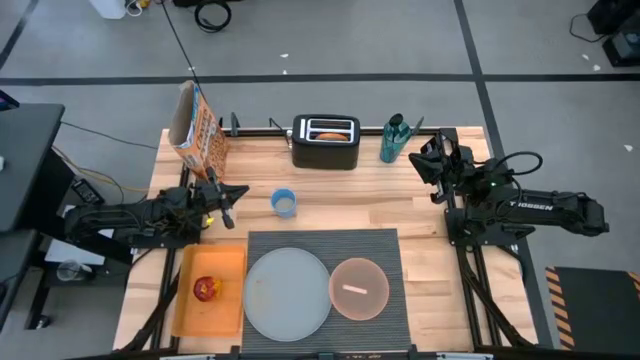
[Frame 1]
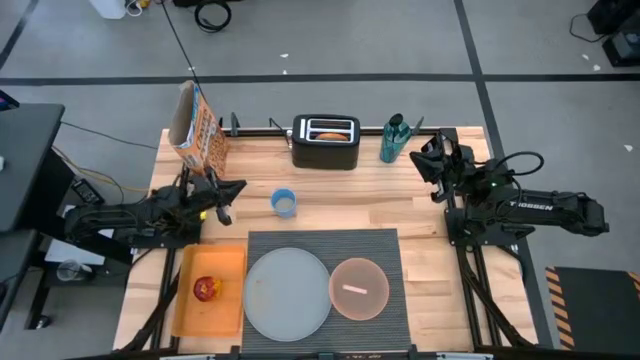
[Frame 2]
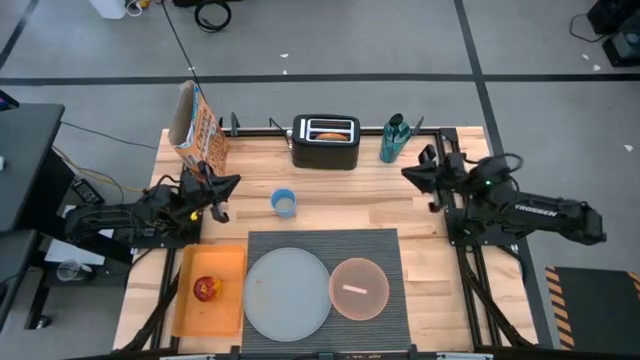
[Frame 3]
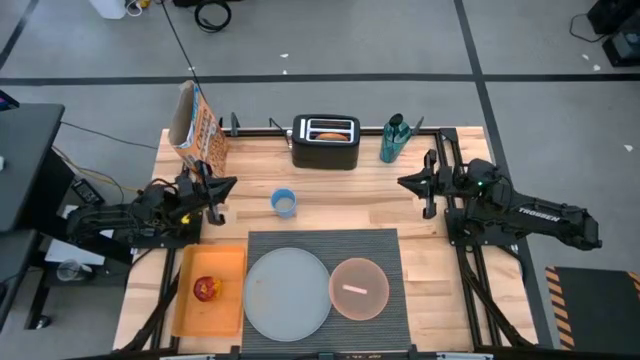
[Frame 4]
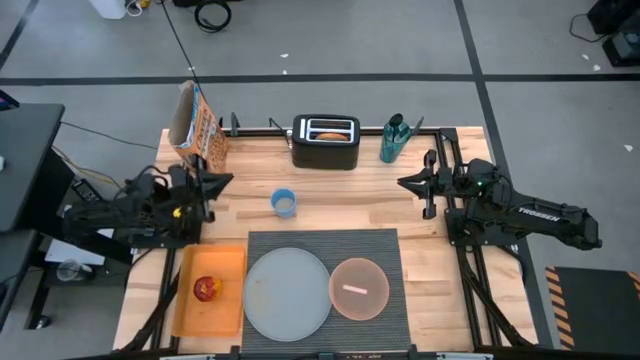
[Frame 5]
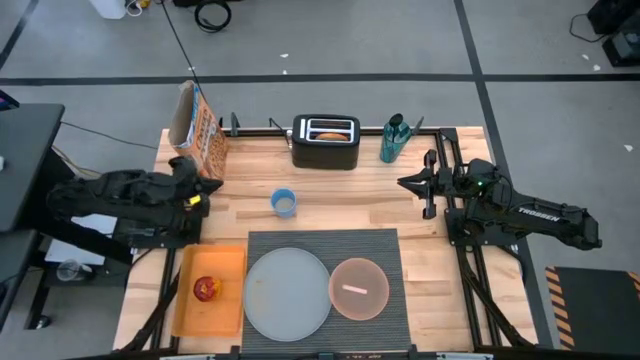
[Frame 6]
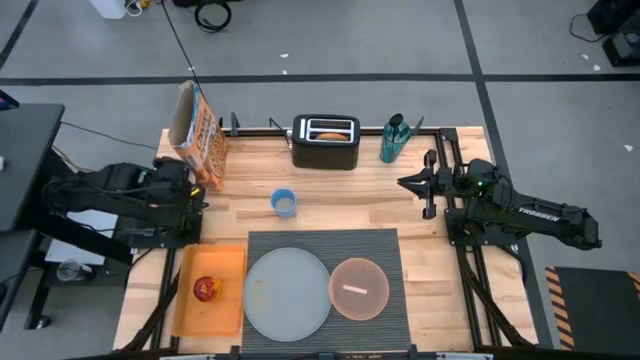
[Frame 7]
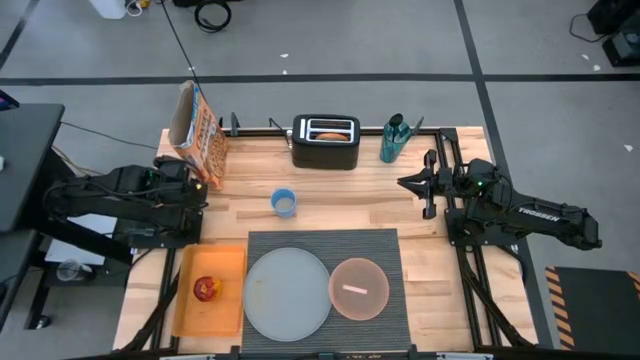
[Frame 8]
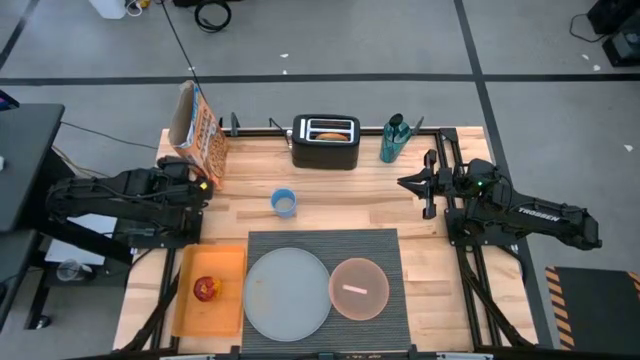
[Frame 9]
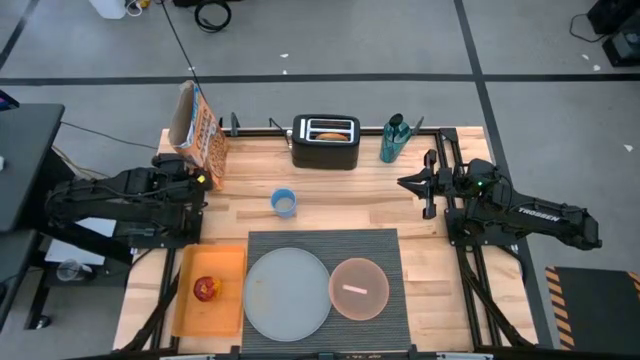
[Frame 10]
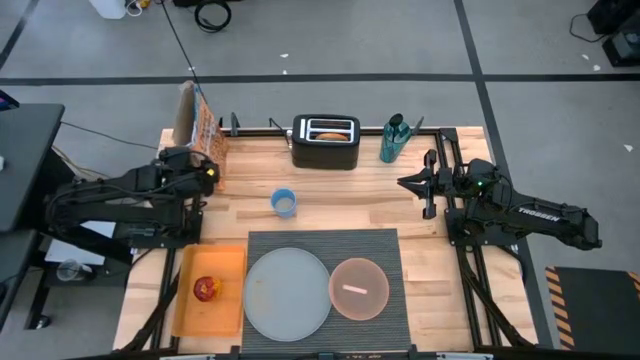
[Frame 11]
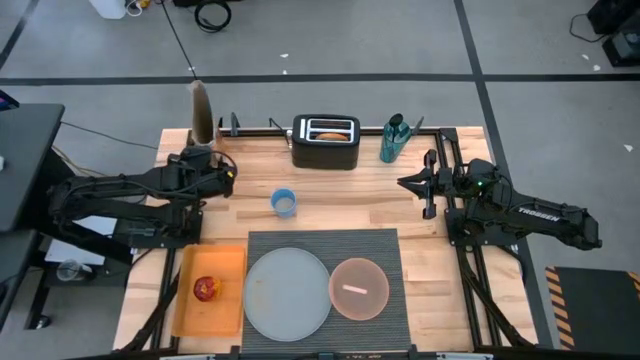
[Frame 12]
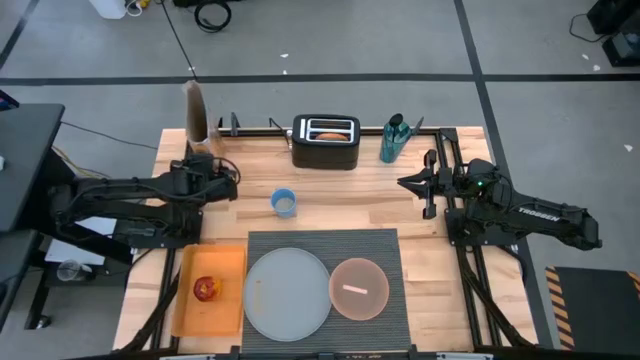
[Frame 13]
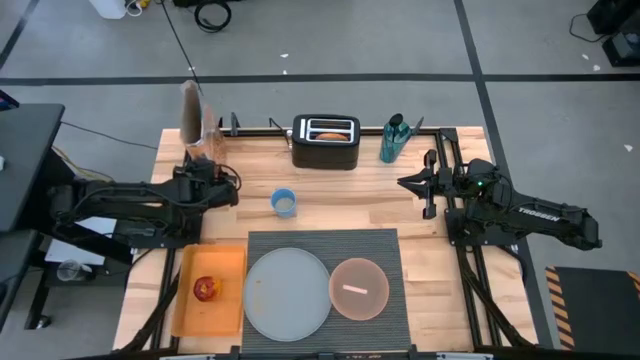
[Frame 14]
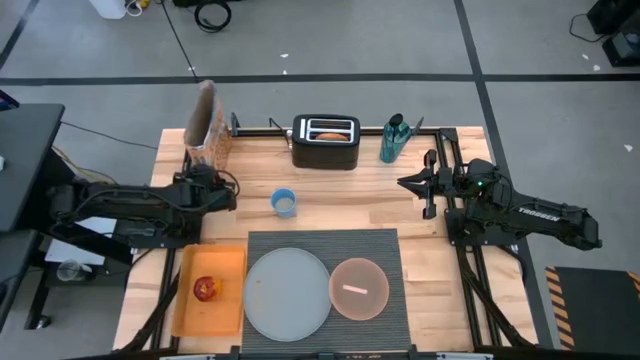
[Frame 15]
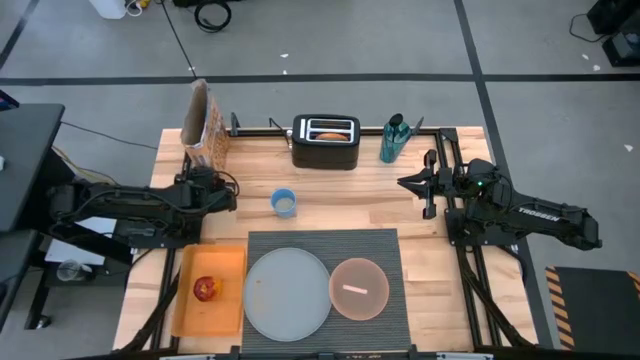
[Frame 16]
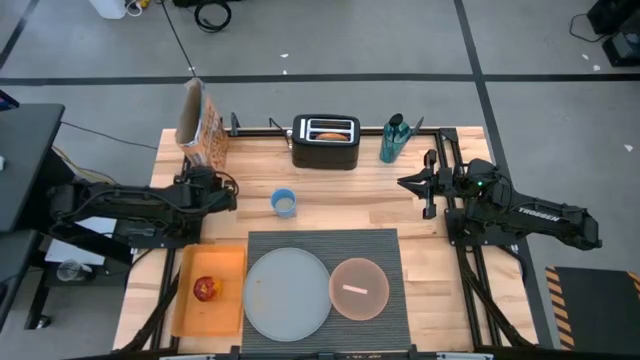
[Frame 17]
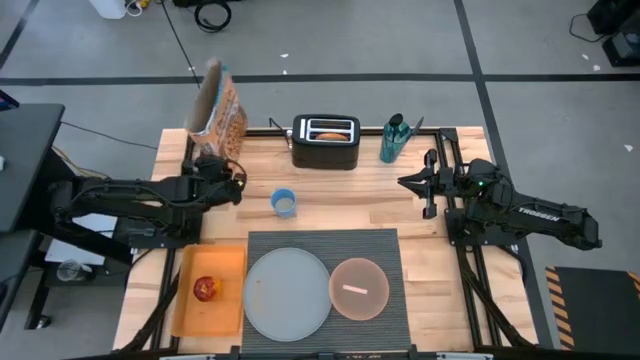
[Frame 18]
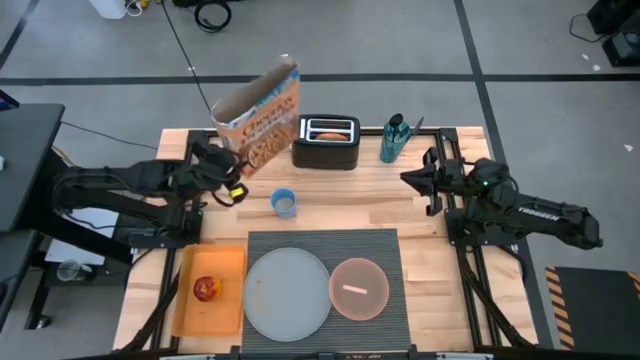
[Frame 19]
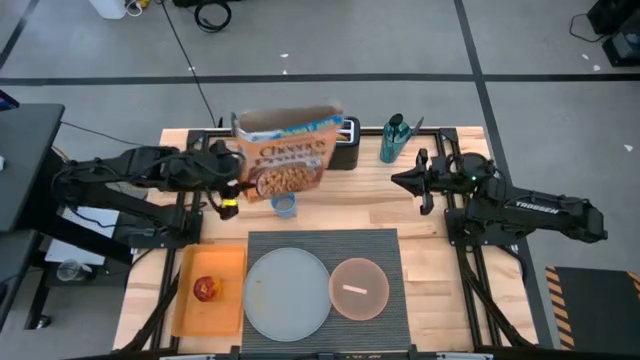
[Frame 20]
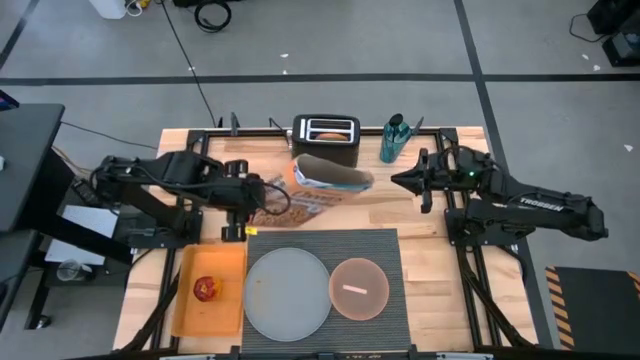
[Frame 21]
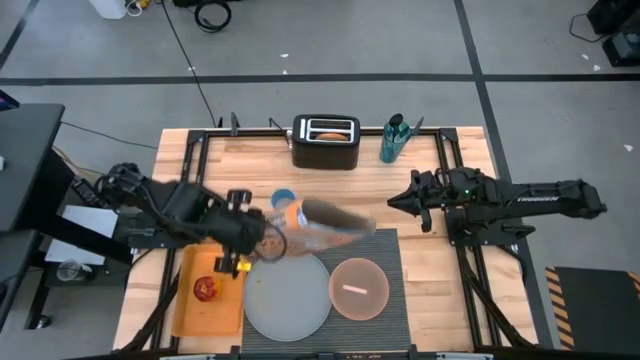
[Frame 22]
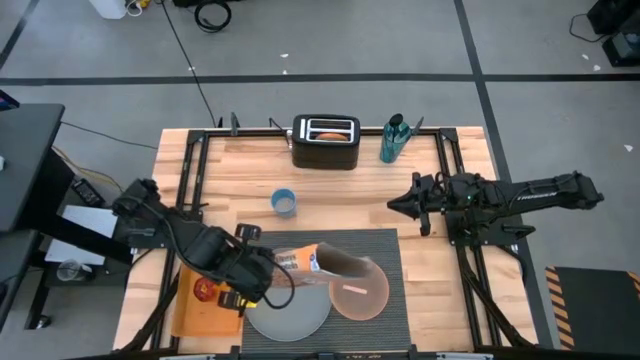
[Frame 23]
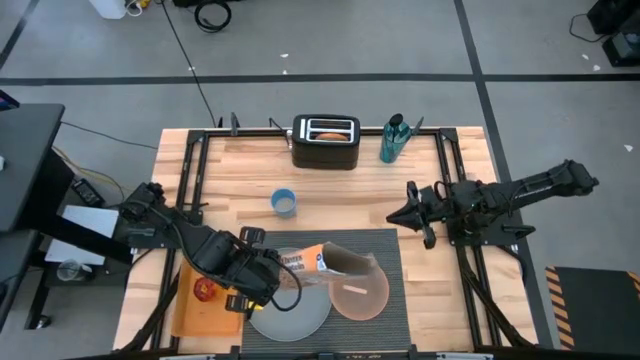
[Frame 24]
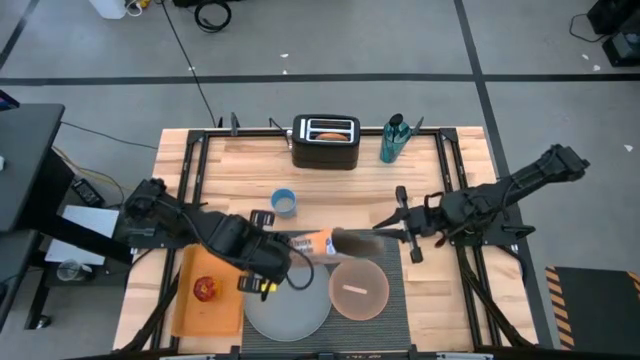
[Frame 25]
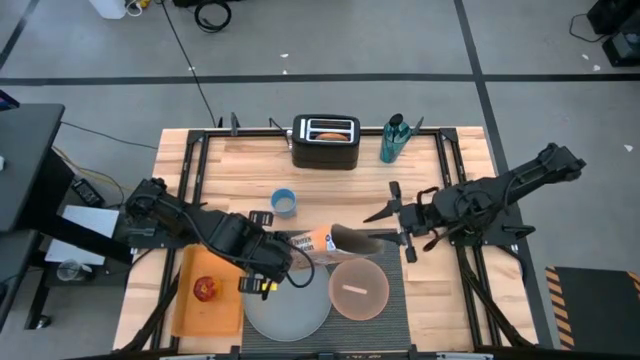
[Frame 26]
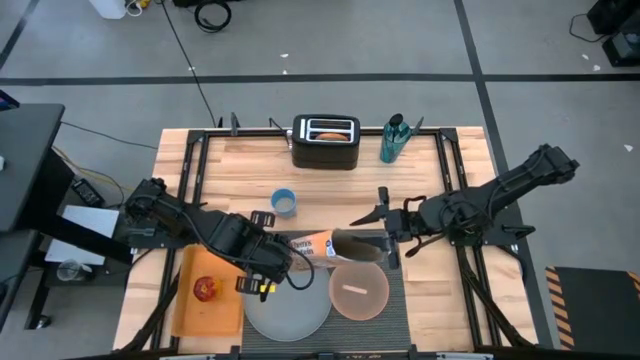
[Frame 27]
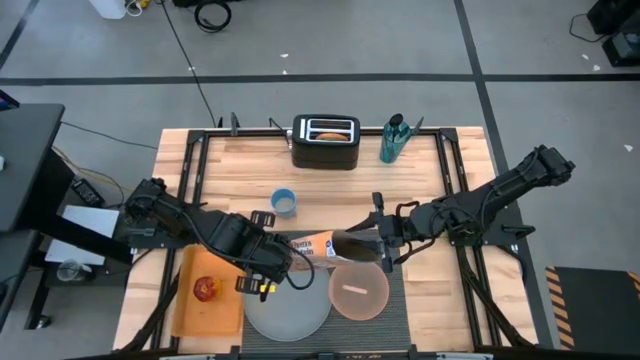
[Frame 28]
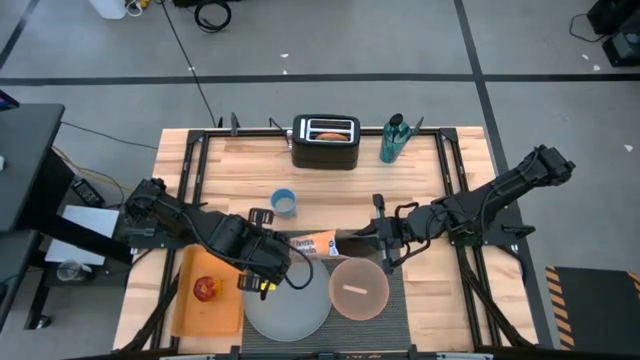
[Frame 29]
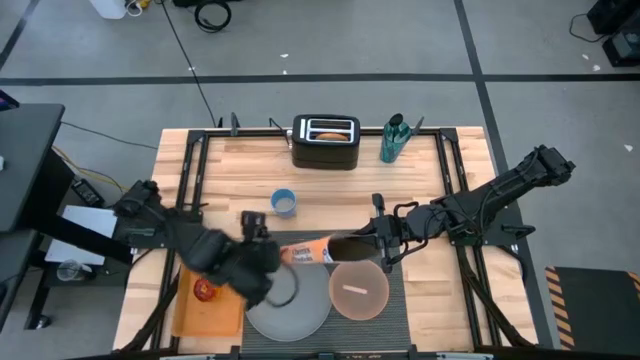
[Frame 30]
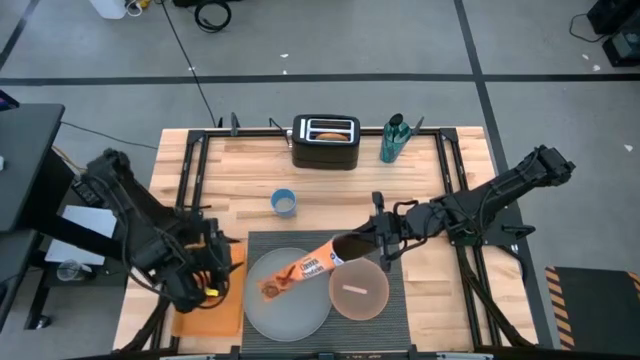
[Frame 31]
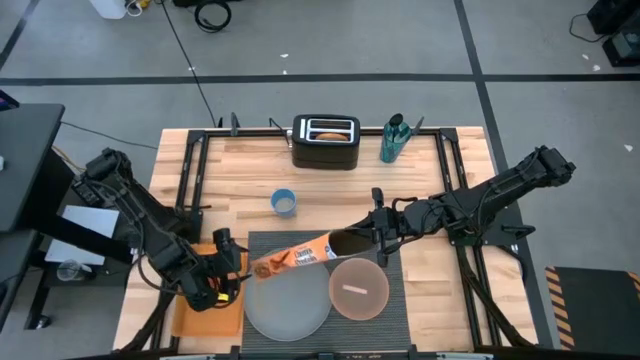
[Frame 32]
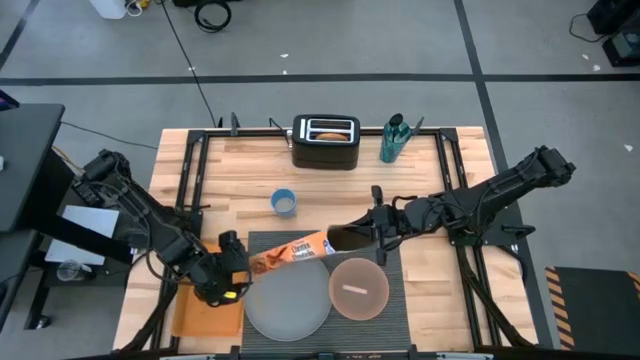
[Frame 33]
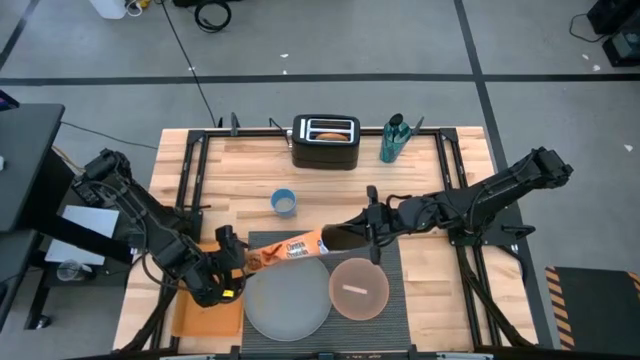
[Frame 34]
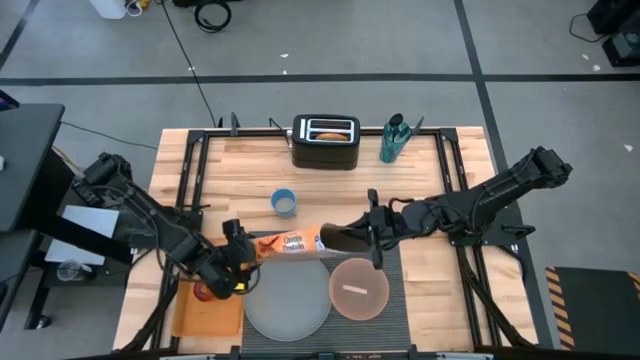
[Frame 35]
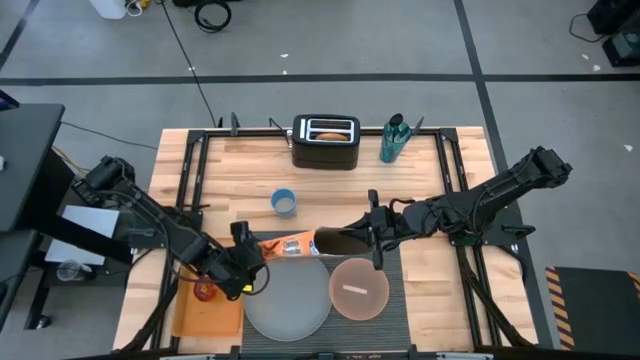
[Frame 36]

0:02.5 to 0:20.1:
Task: Arrange a breakfast setting
Pour the cereal from the cereal box into the light orange bowl
